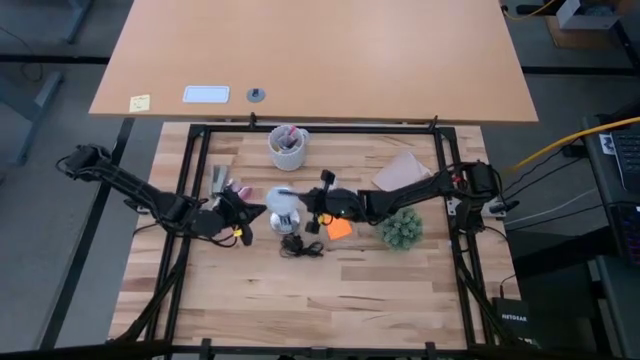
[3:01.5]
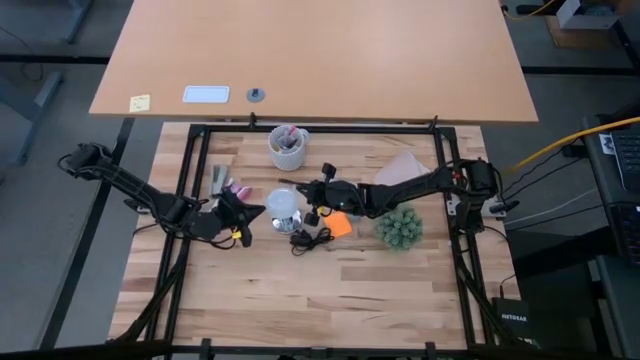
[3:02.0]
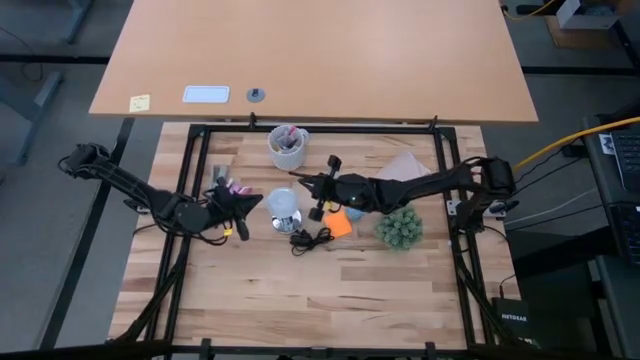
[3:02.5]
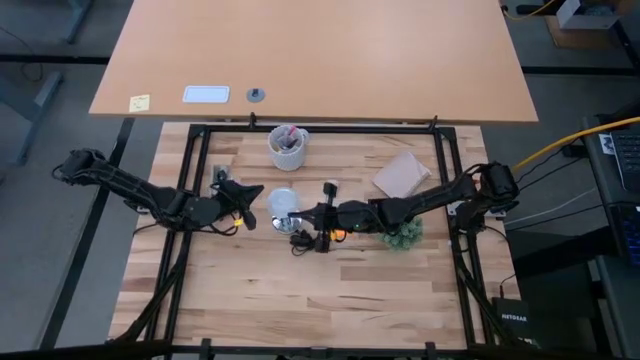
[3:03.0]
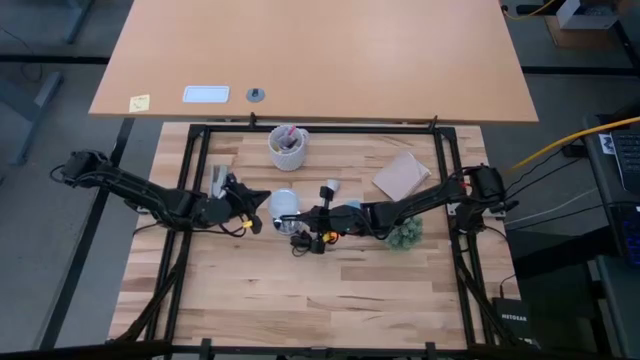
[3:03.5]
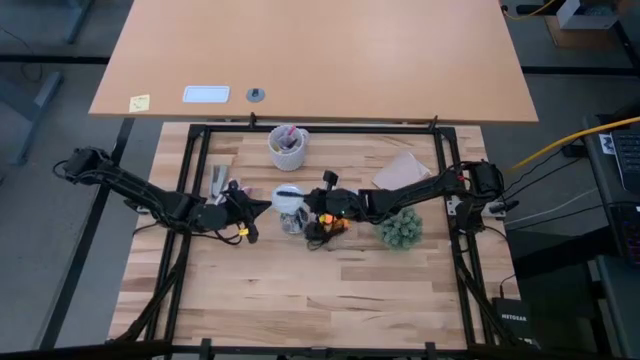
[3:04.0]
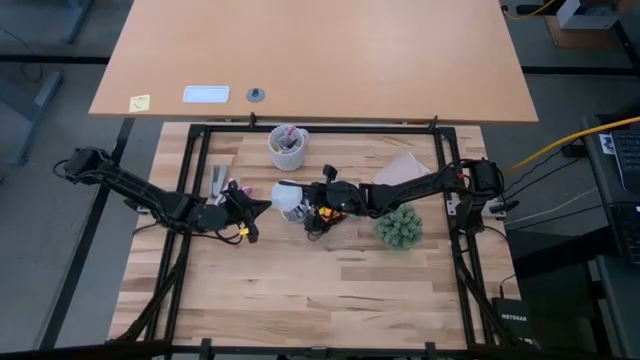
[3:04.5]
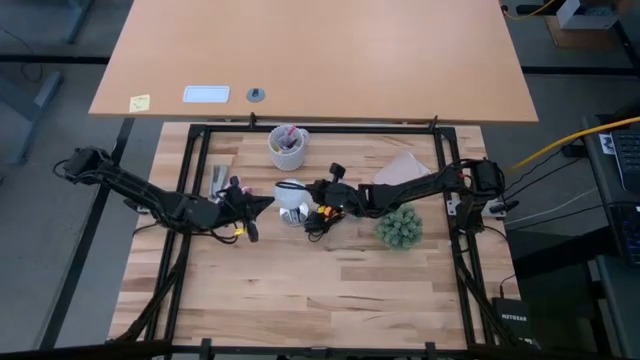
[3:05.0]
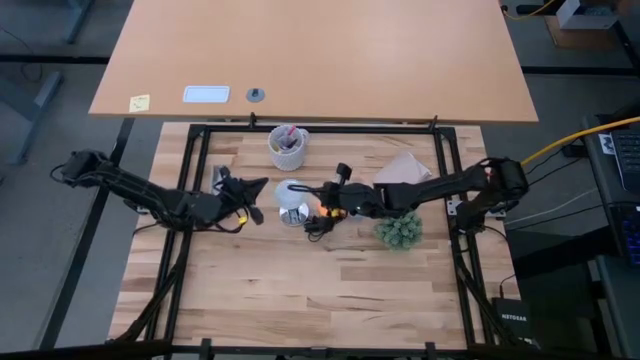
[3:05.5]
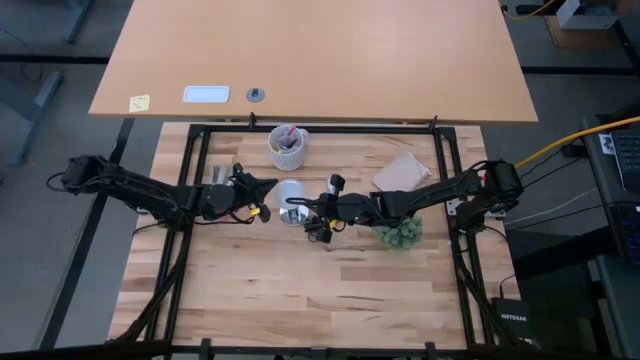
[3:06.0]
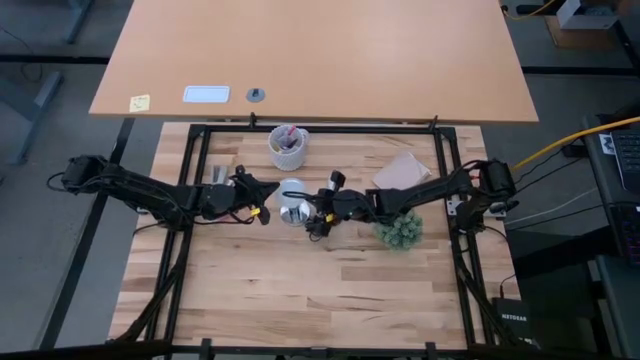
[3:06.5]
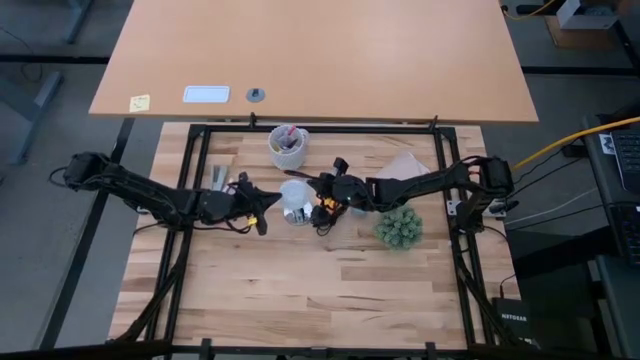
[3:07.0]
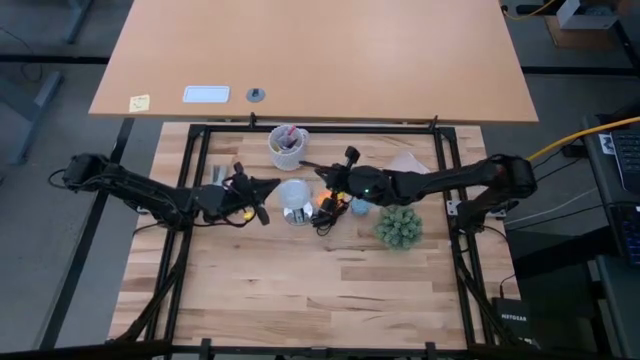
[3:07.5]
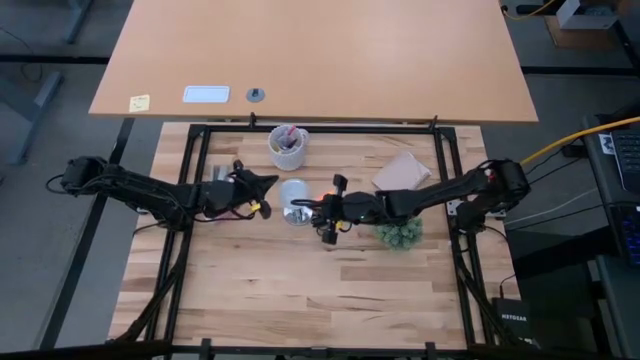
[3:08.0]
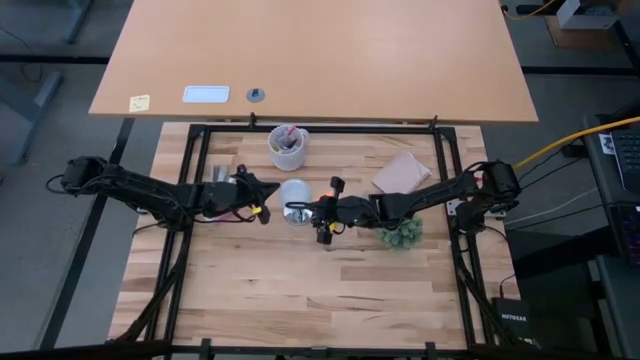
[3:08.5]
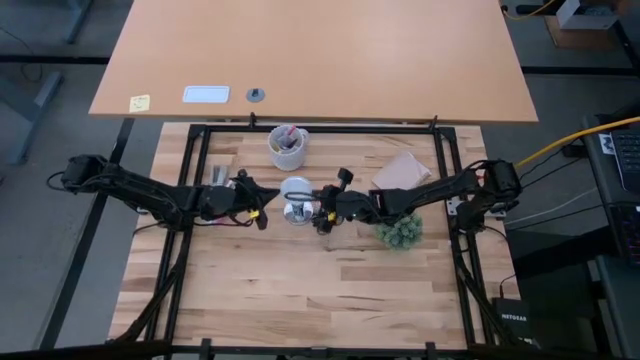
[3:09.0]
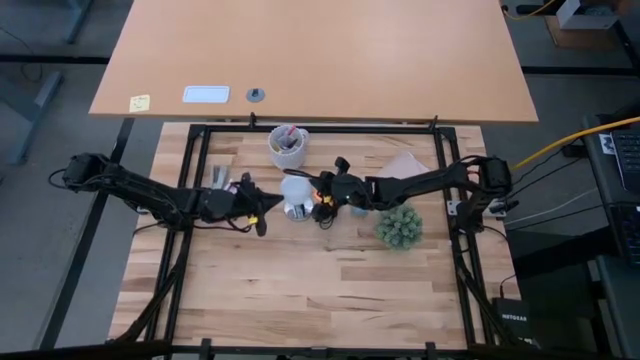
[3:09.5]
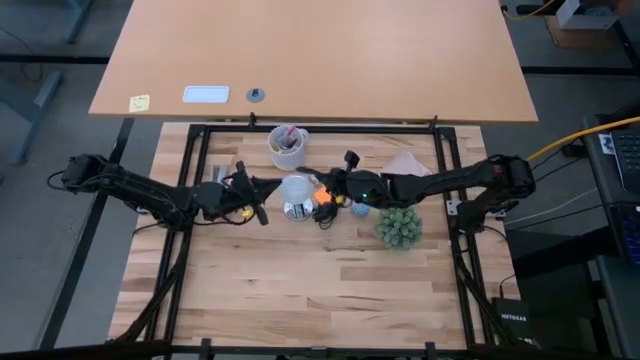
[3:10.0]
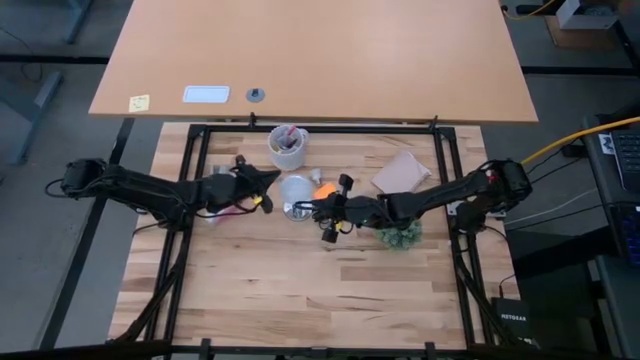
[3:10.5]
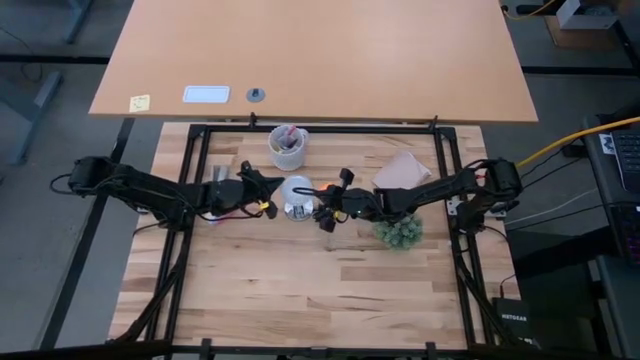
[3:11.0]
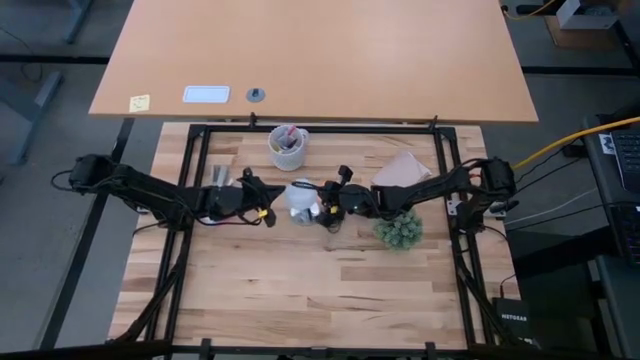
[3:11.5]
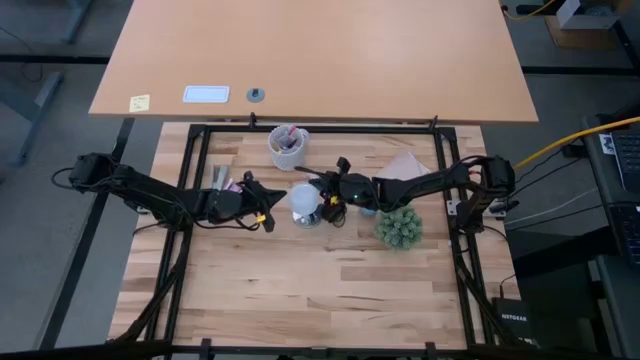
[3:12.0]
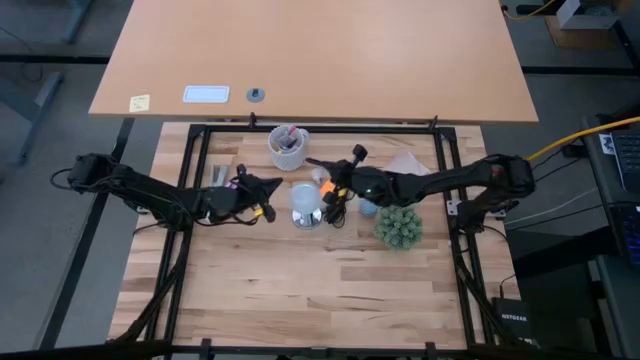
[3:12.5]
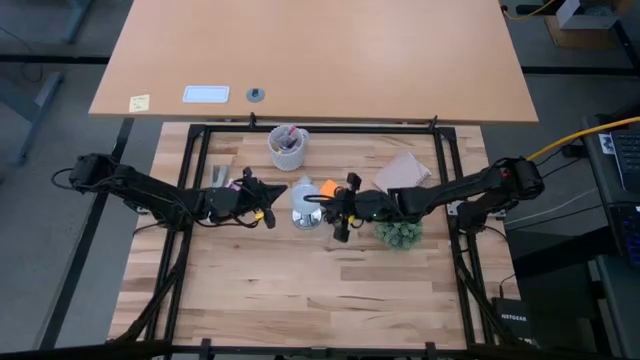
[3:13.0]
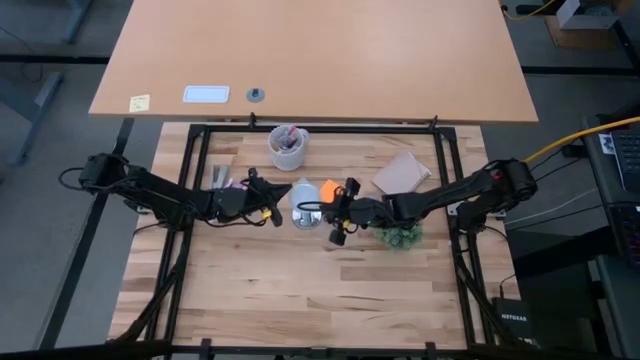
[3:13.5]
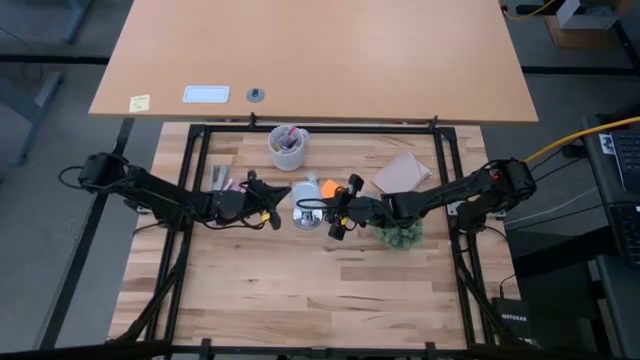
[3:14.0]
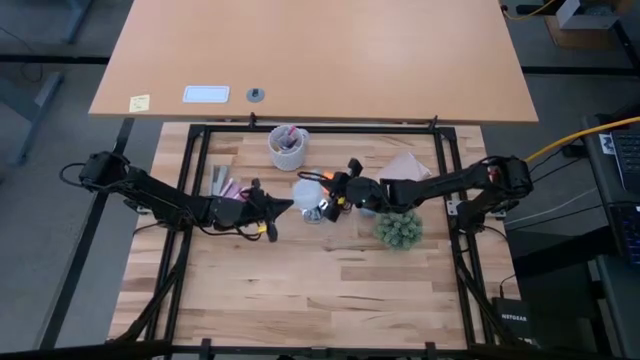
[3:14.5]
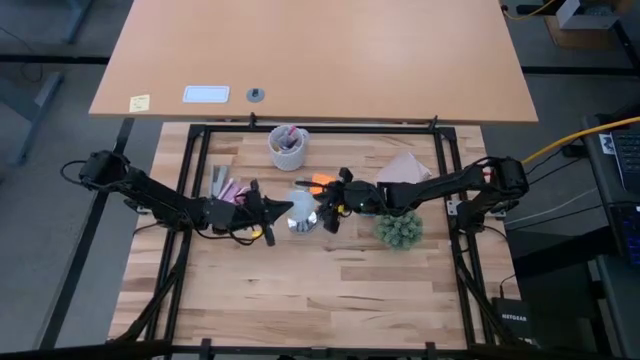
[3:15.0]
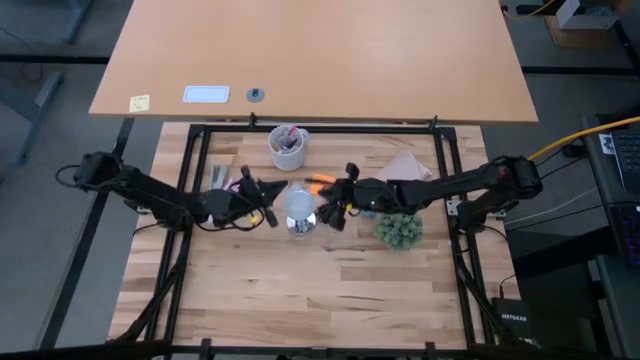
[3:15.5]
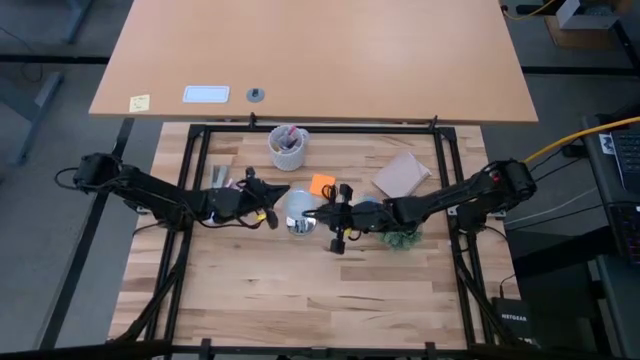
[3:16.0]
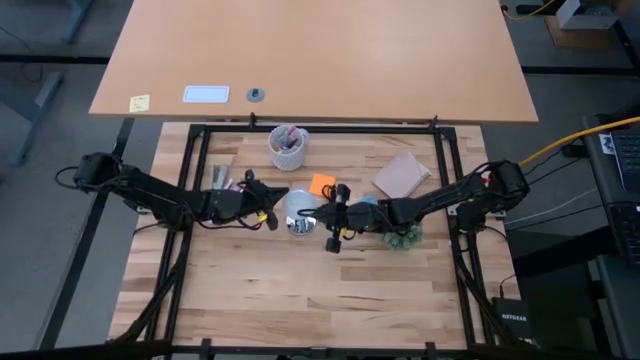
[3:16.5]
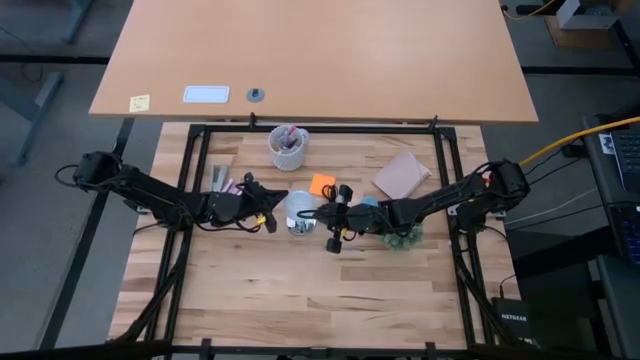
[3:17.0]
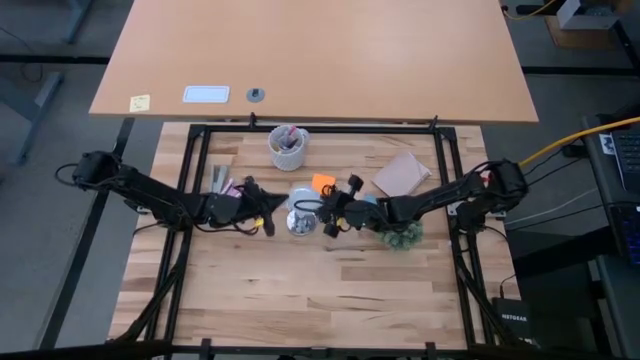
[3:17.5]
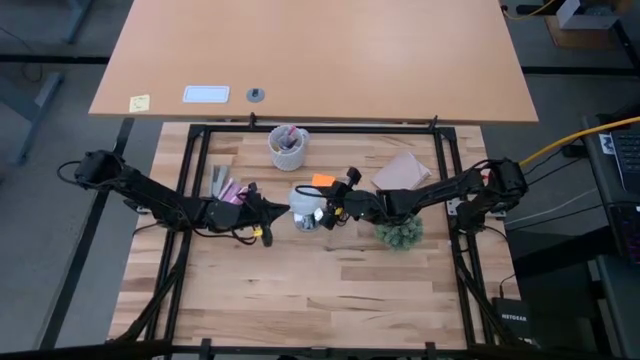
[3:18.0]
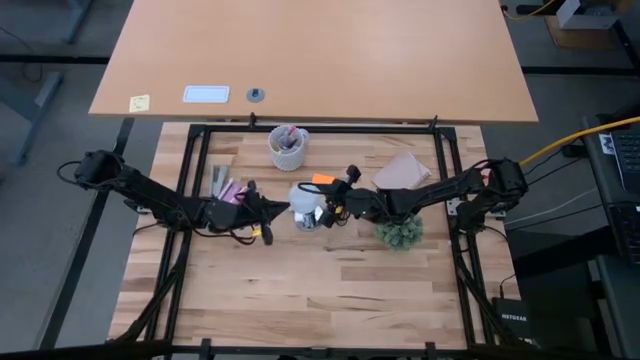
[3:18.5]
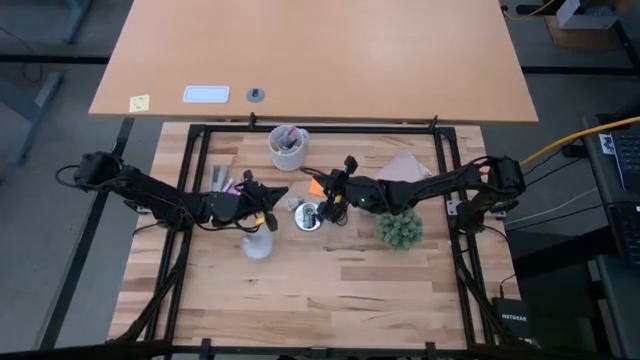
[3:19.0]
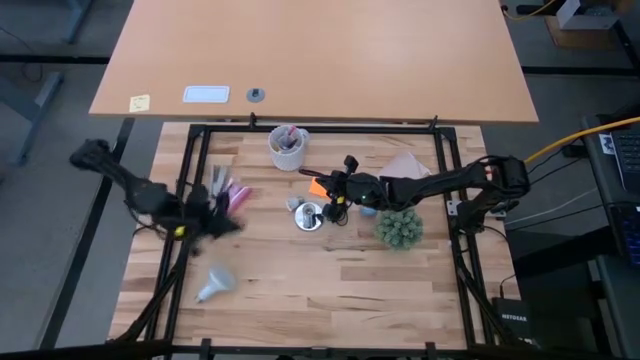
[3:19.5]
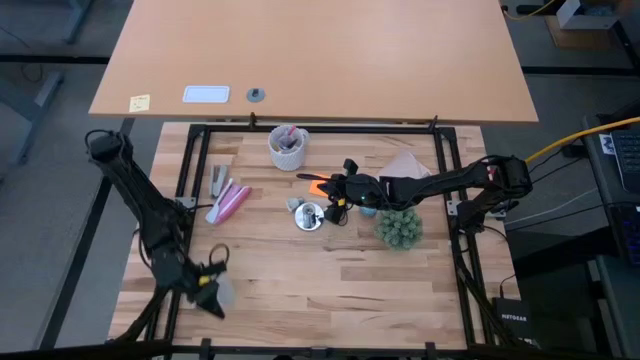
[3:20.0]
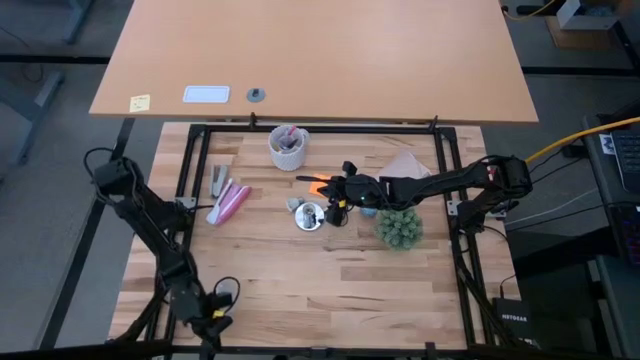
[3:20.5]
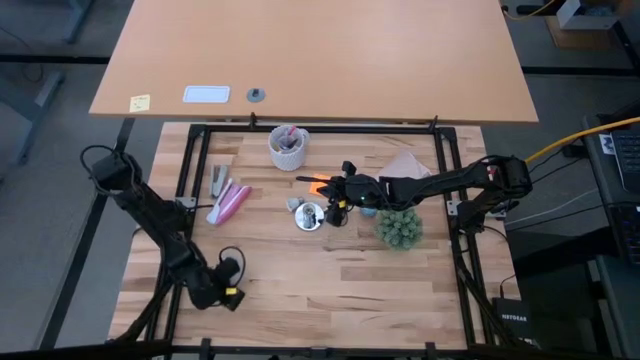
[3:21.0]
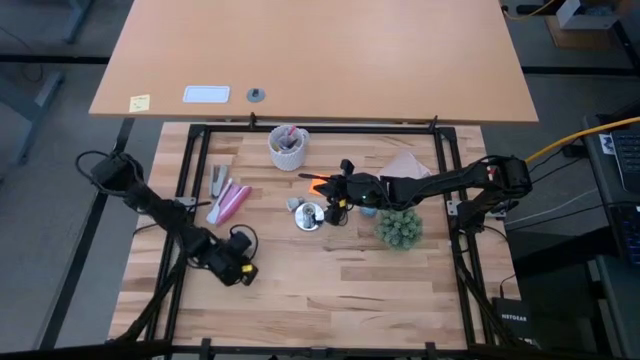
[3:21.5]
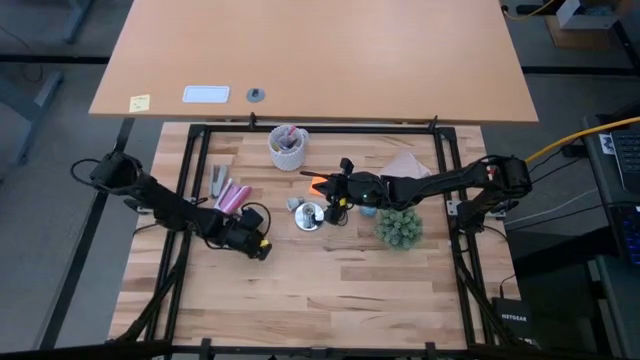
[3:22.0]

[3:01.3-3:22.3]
Task: Screw lightbulb
Remove the light bulb from the silver lamp
